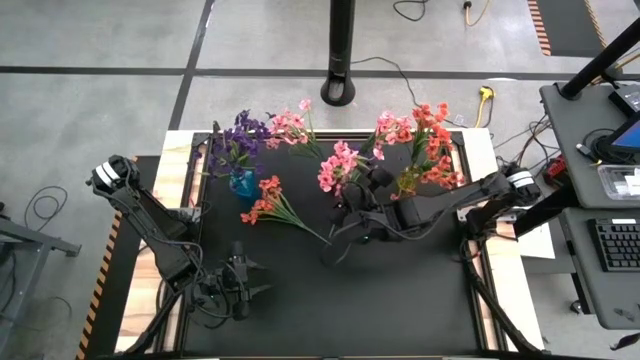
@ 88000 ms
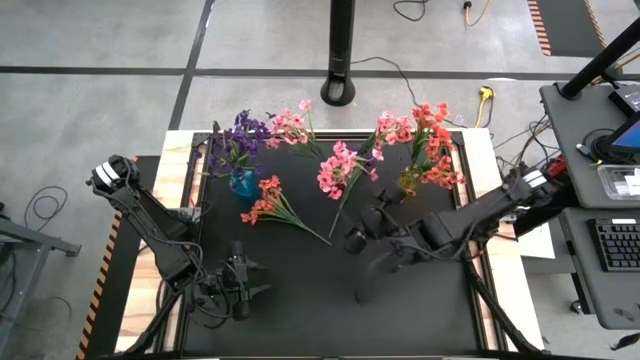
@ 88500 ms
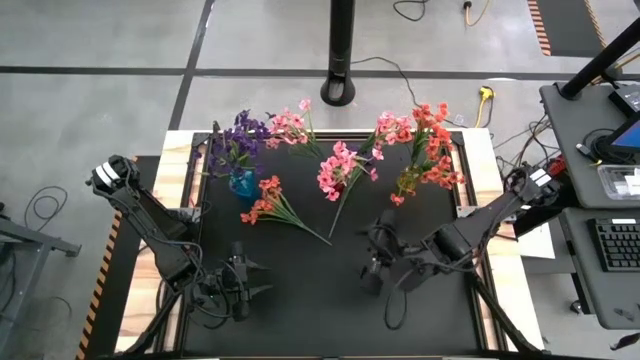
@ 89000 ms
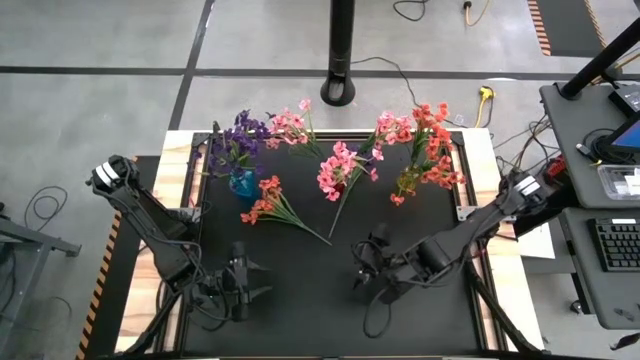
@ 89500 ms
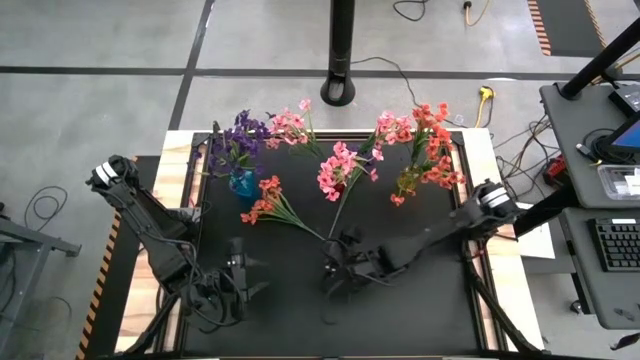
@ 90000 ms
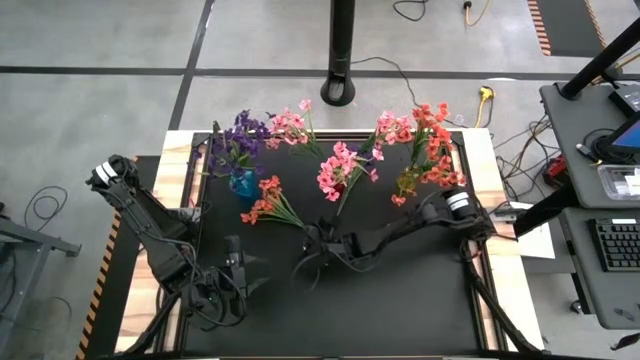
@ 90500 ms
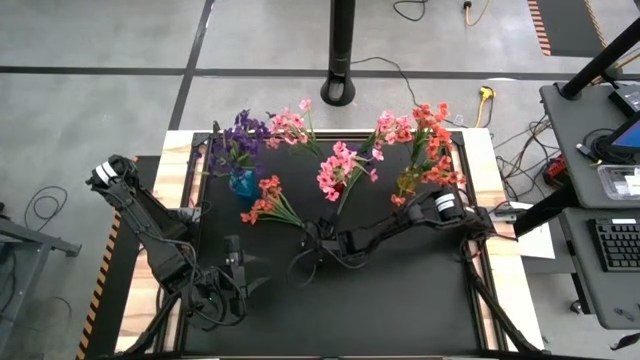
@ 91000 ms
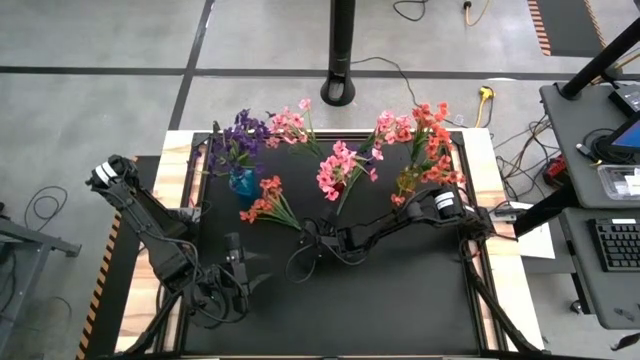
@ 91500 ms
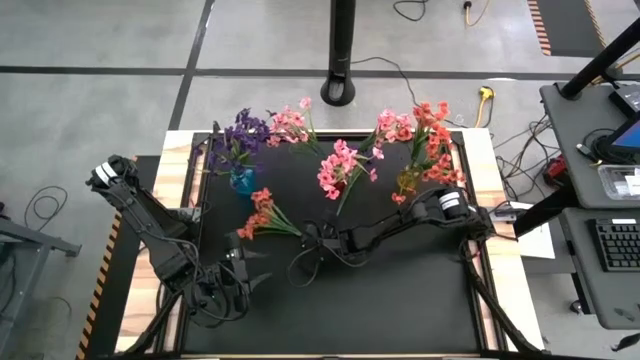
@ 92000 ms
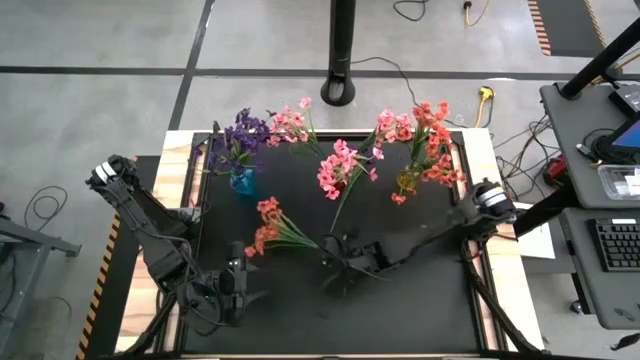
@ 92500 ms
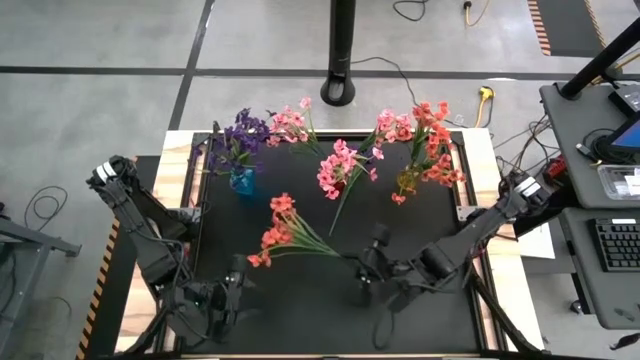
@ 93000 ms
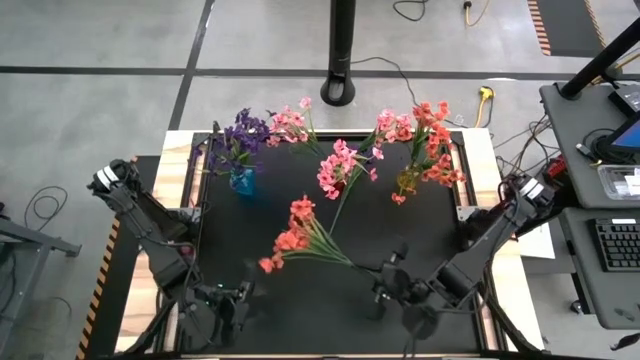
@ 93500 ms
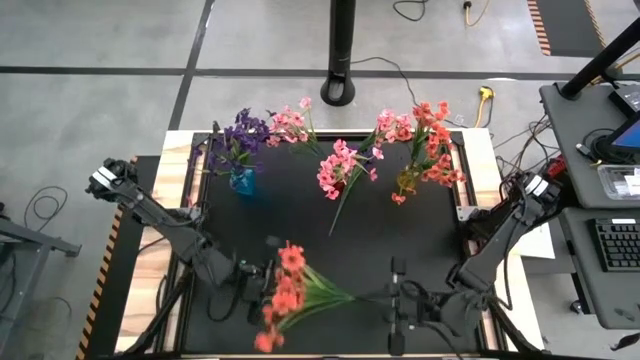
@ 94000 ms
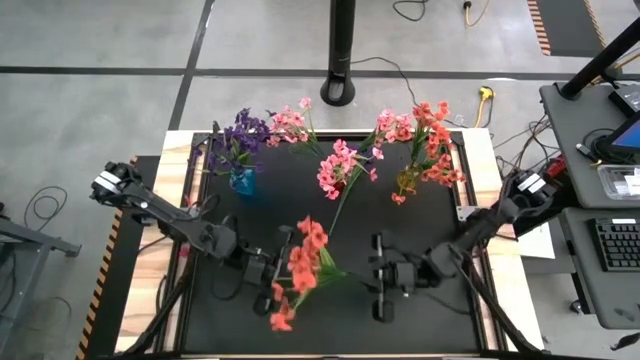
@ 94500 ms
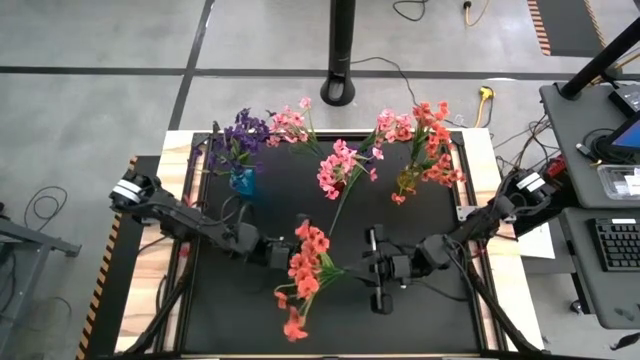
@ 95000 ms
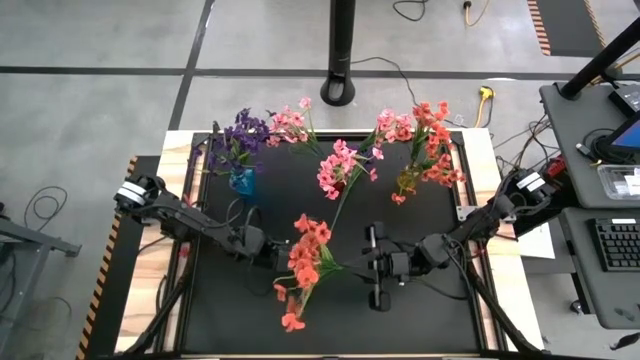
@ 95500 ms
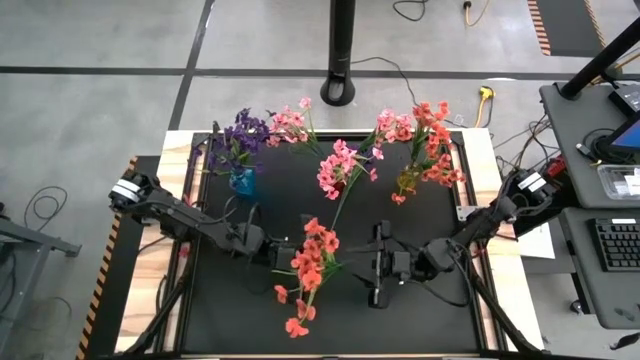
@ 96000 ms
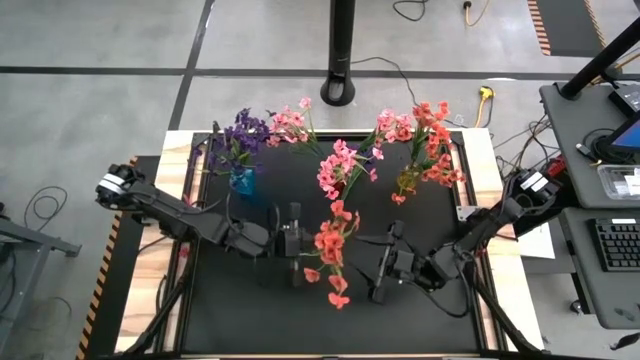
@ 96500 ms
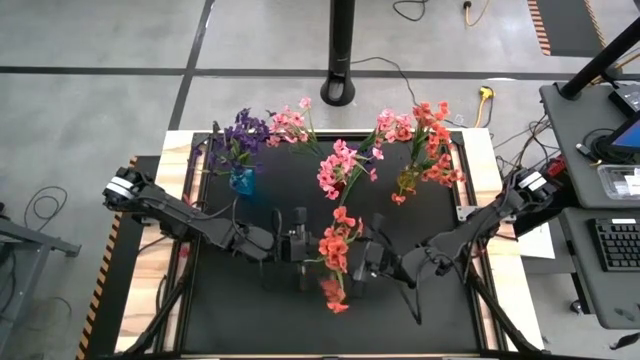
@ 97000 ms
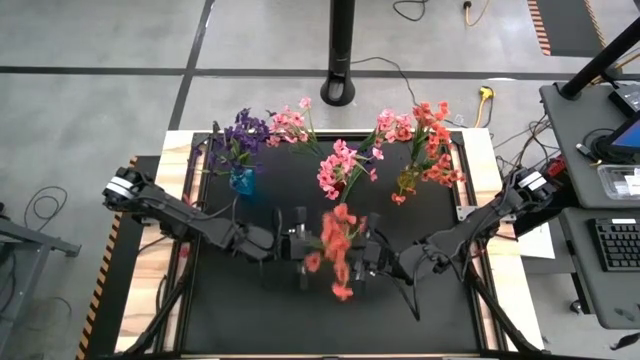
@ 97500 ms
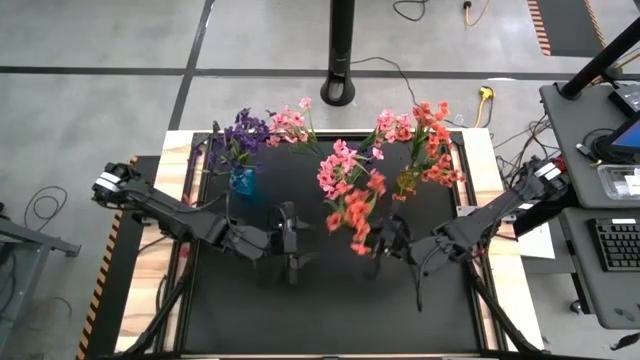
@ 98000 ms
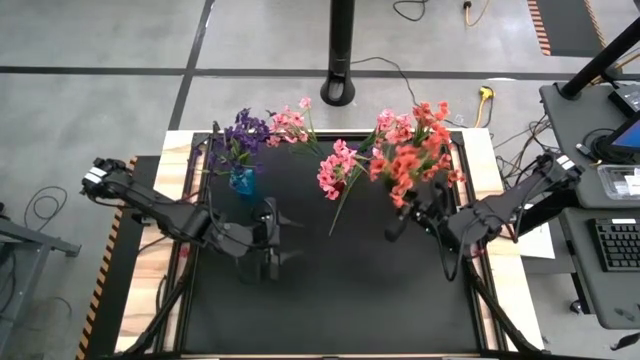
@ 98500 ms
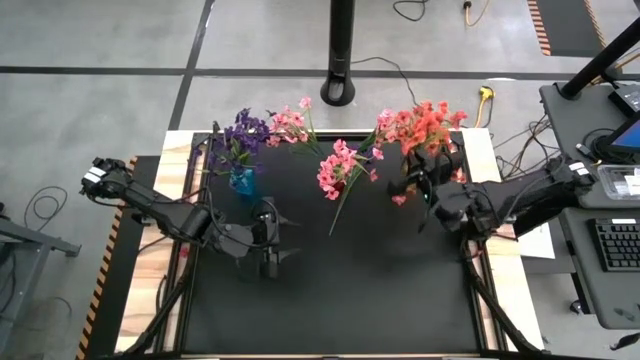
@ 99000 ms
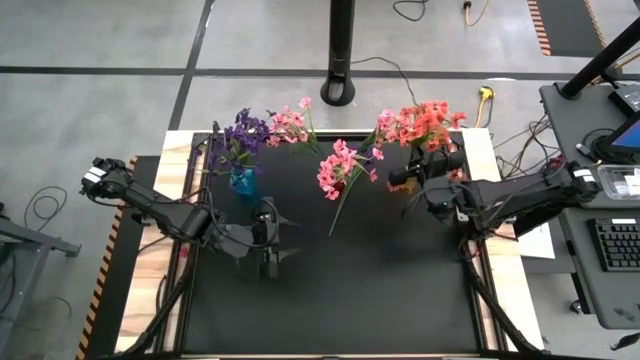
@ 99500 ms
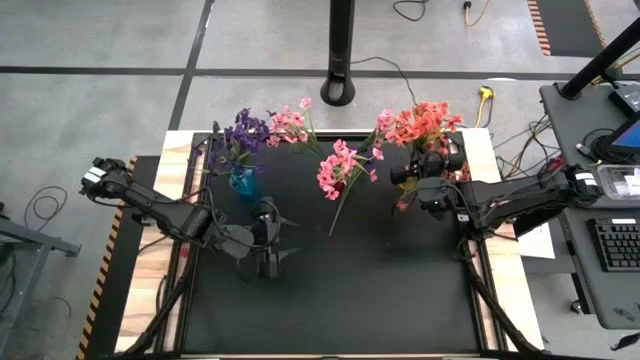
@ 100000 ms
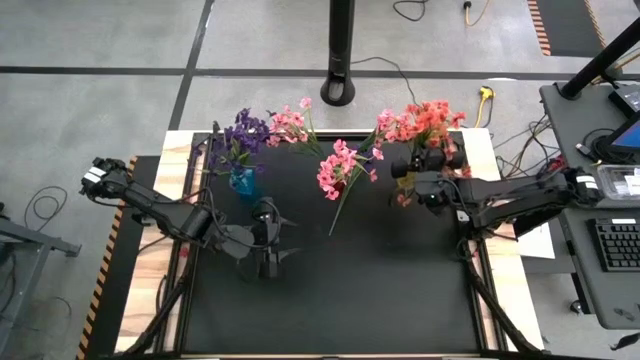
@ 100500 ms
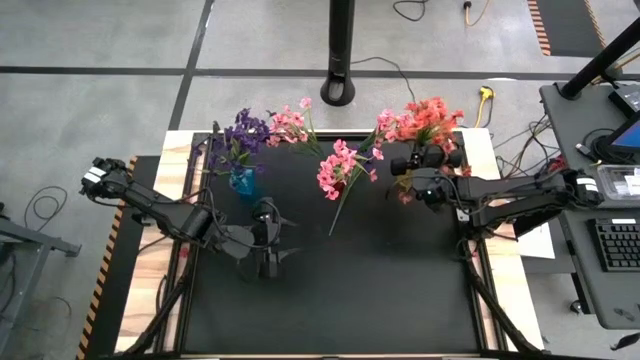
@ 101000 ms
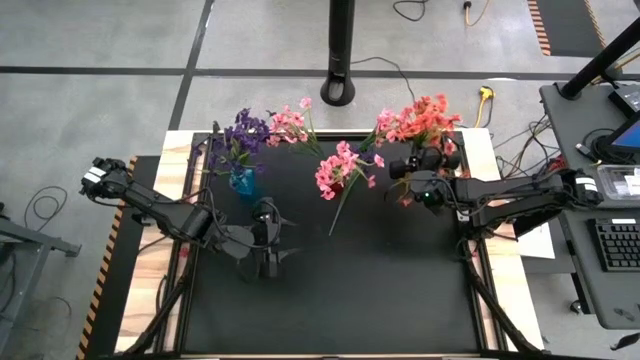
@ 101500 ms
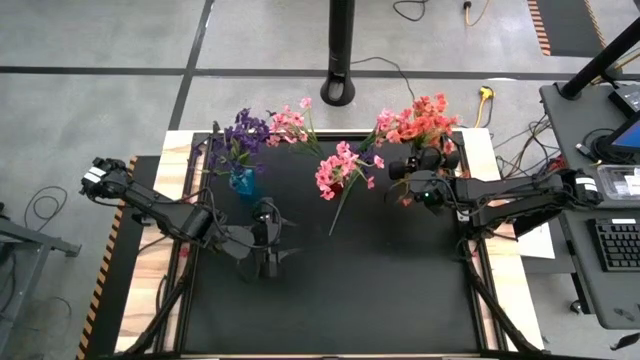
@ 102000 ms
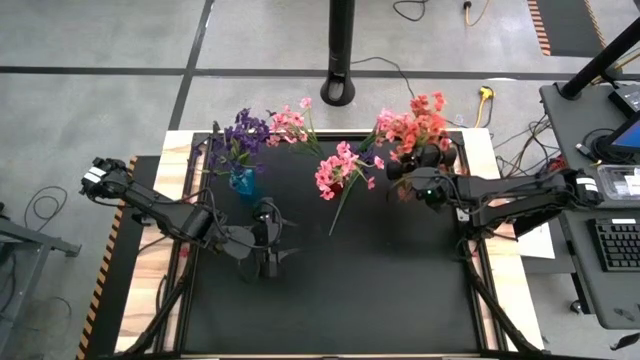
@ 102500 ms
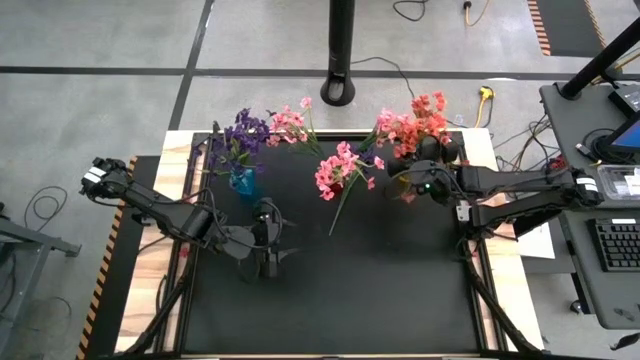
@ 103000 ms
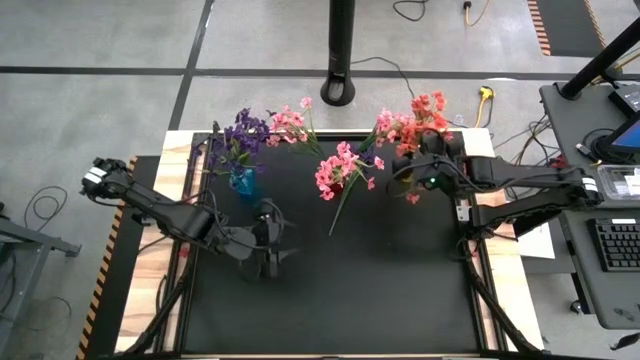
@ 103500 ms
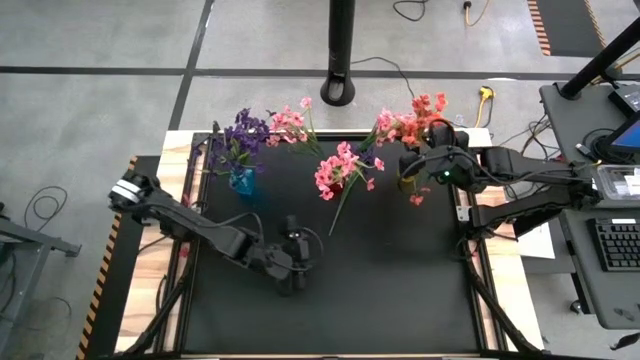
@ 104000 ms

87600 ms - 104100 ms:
Task: Sort flowers into vase by color
Put the orange flower into the yellow vase

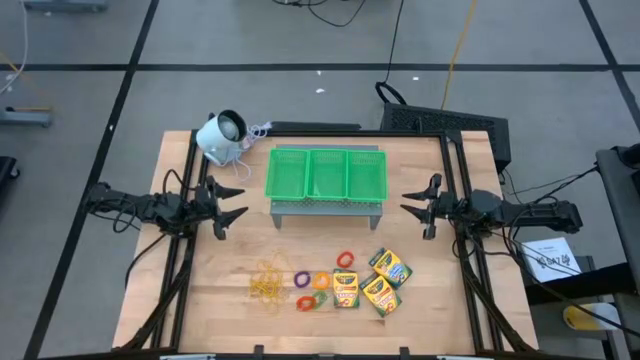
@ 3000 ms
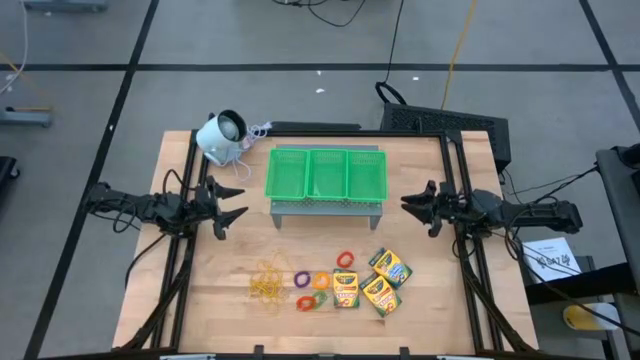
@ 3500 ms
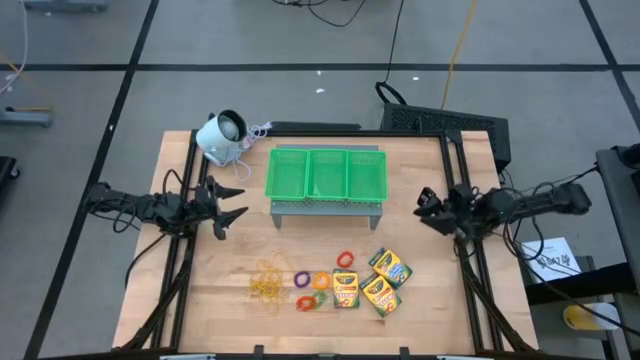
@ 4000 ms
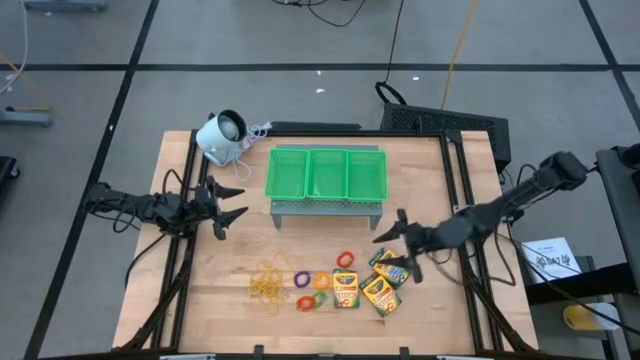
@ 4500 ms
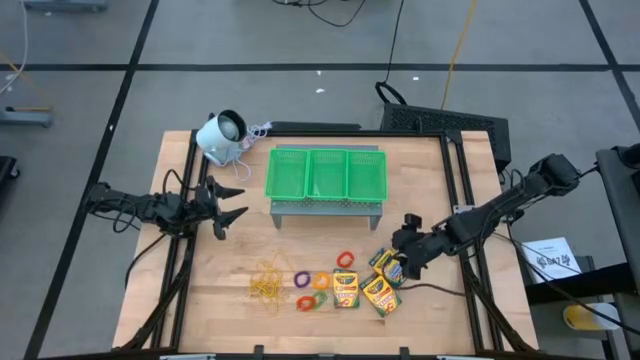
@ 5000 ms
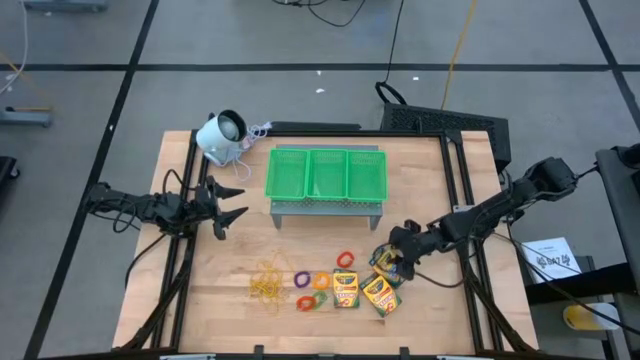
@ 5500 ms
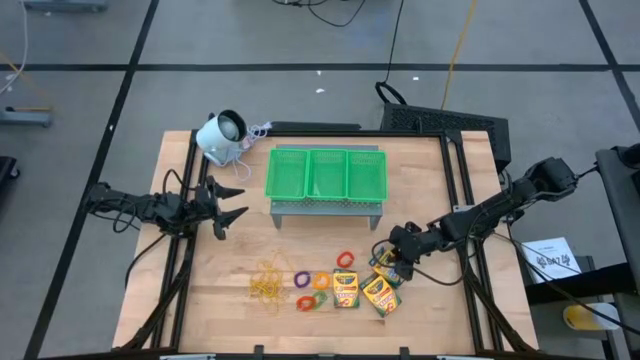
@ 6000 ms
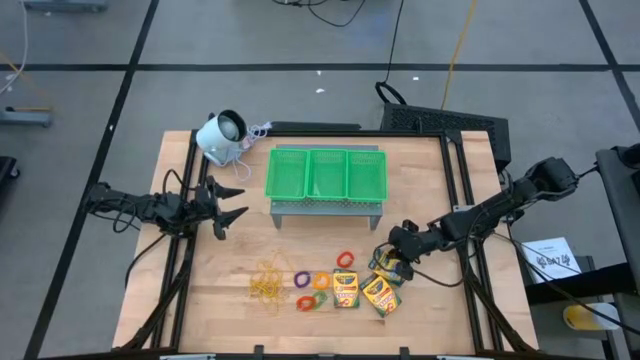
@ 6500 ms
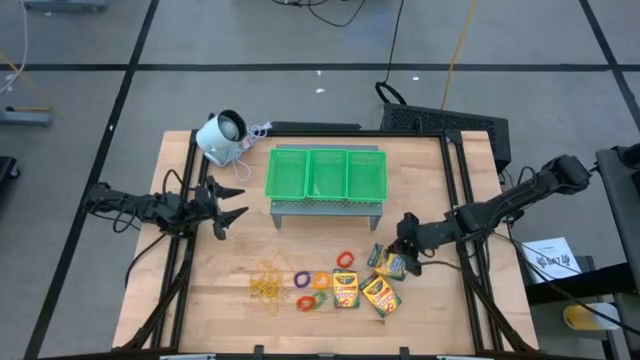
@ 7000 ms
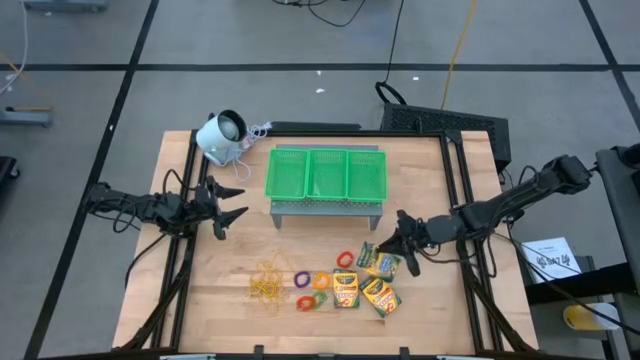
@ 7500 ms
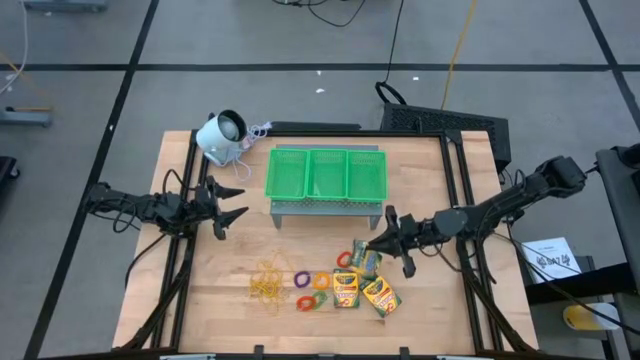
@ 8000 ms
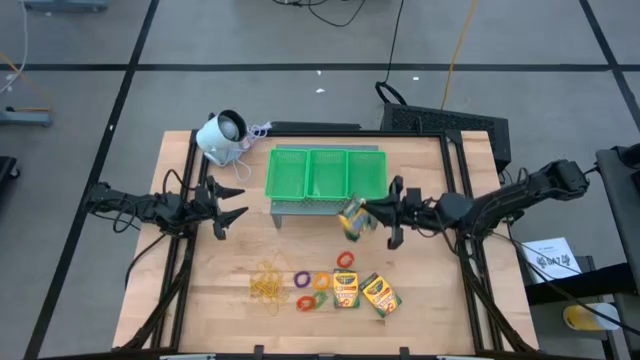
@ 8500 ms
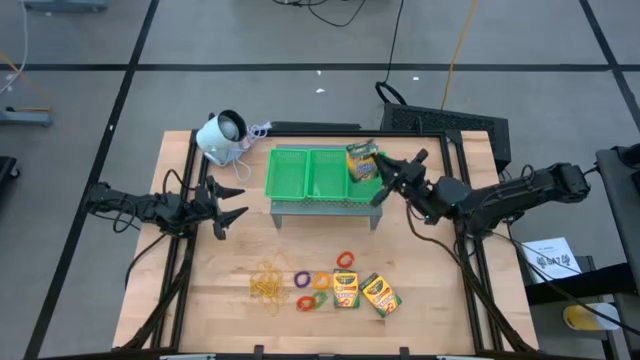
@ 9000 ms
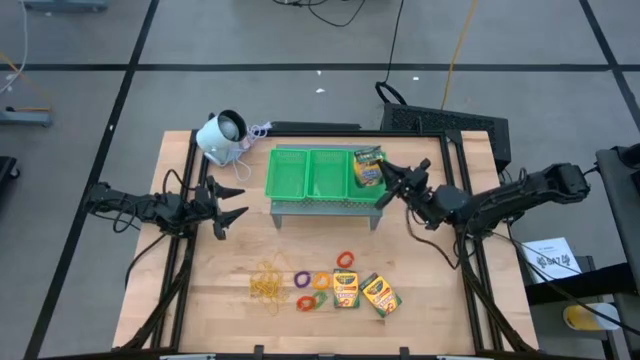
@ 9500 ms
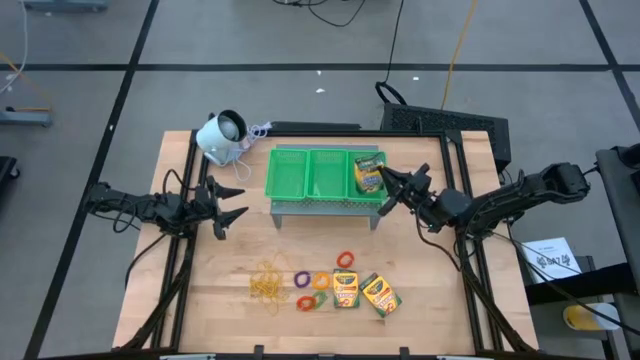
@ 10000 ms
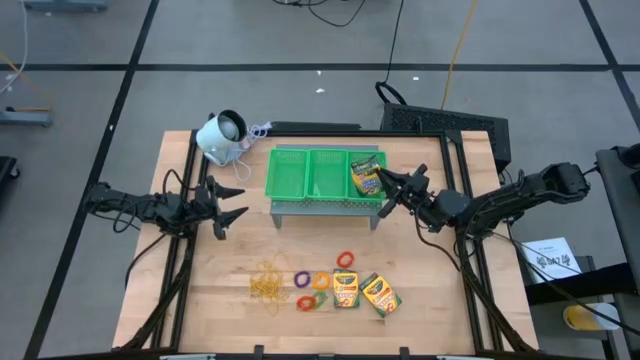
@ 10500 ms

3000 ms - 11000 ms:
Task: Pick & Place Office Desk Supplies
Put the right yellow crayon box into the right green basket
